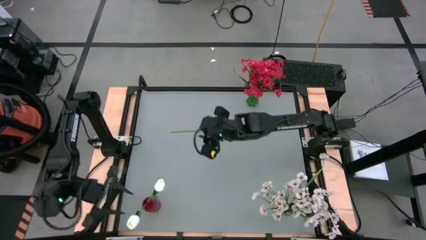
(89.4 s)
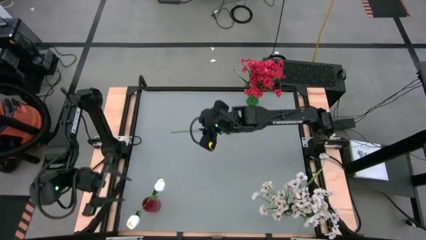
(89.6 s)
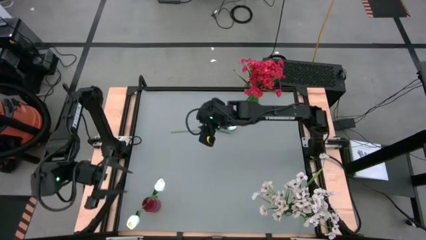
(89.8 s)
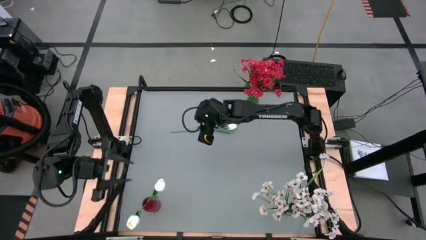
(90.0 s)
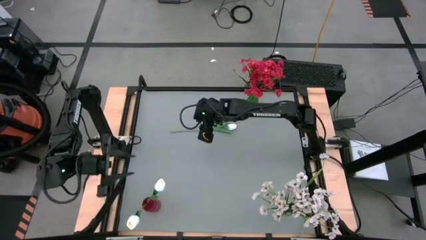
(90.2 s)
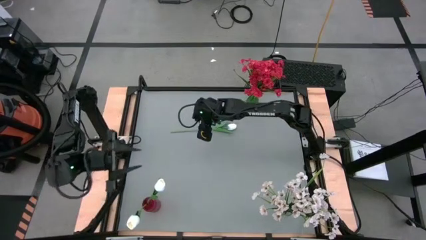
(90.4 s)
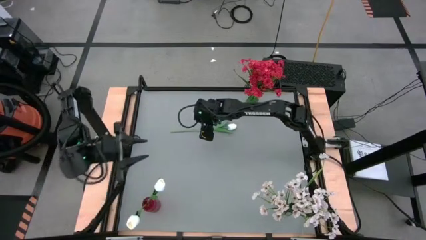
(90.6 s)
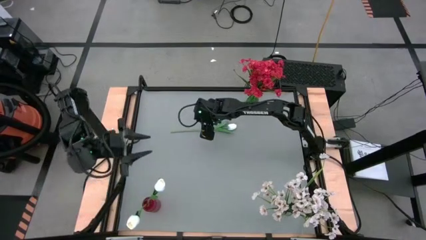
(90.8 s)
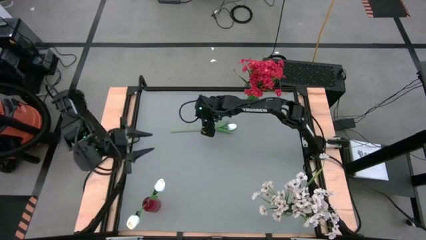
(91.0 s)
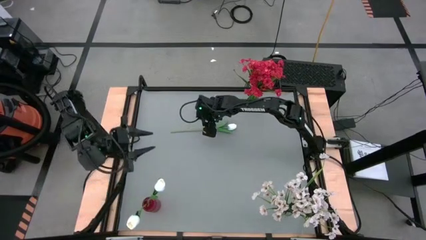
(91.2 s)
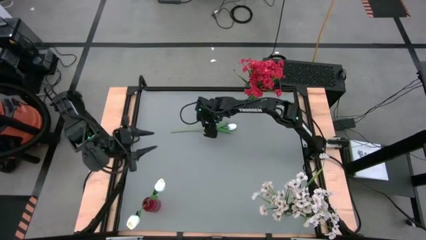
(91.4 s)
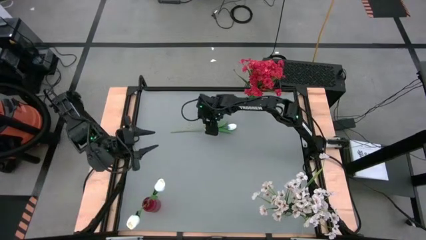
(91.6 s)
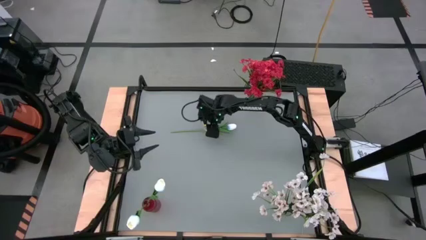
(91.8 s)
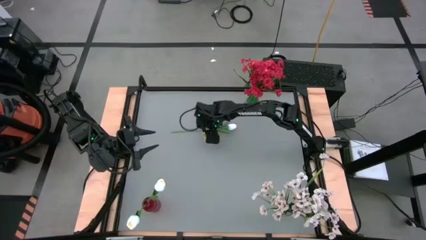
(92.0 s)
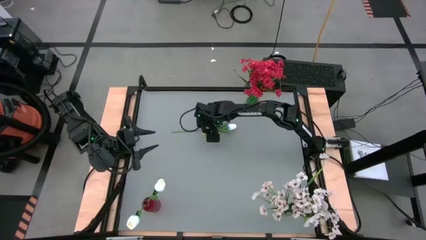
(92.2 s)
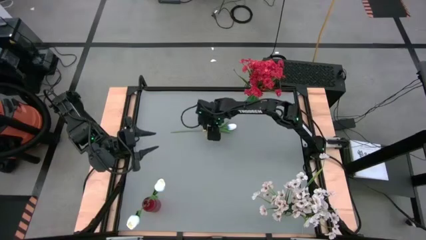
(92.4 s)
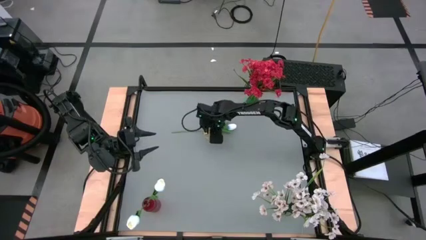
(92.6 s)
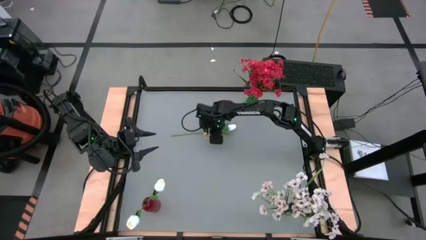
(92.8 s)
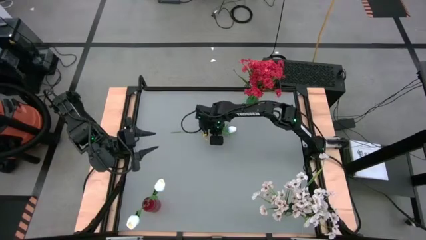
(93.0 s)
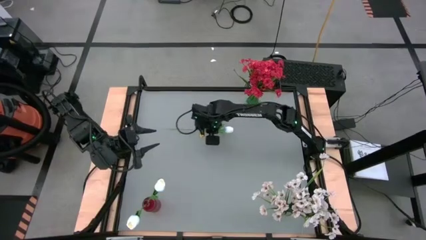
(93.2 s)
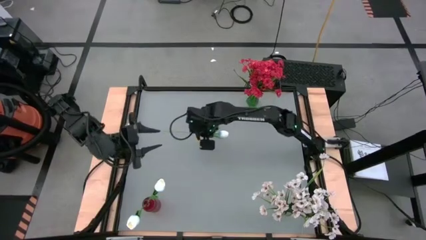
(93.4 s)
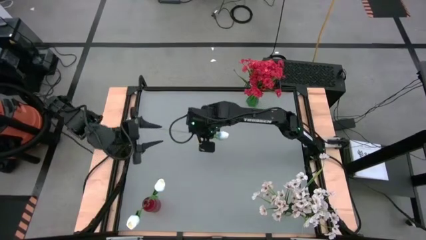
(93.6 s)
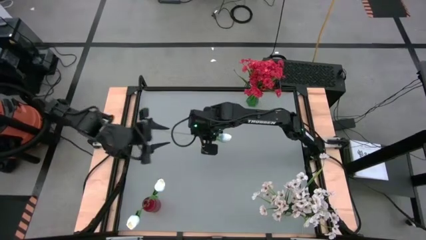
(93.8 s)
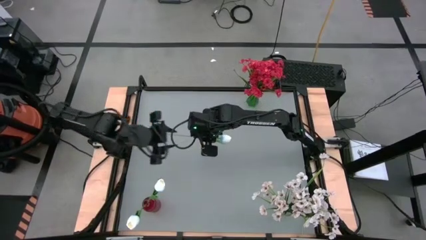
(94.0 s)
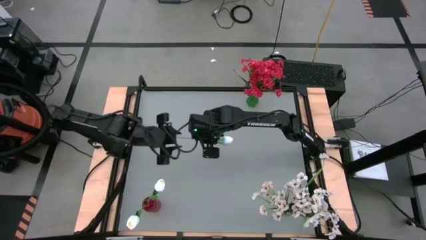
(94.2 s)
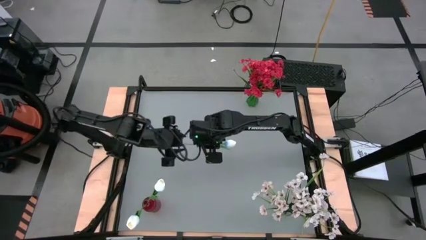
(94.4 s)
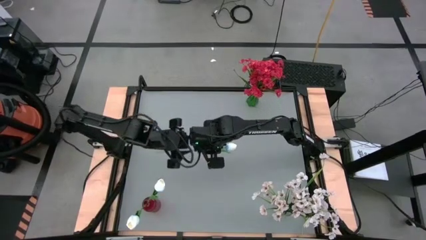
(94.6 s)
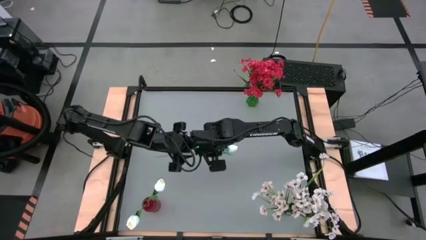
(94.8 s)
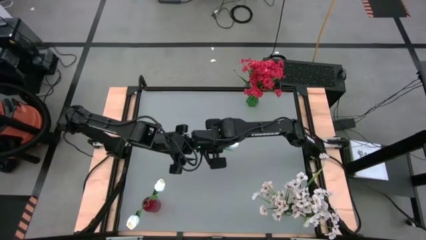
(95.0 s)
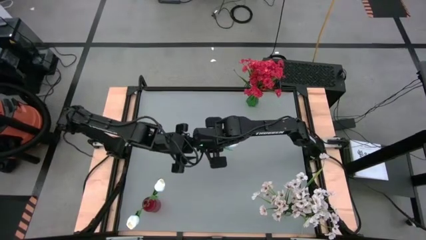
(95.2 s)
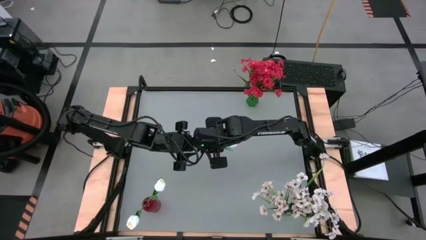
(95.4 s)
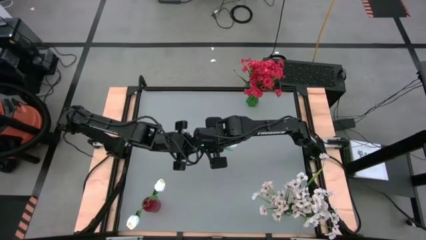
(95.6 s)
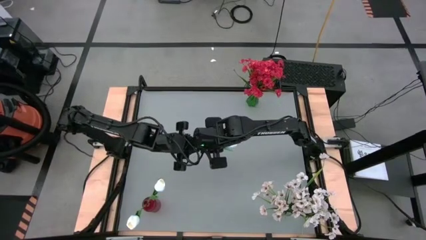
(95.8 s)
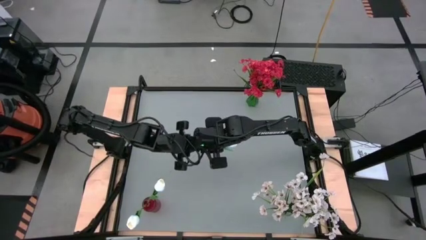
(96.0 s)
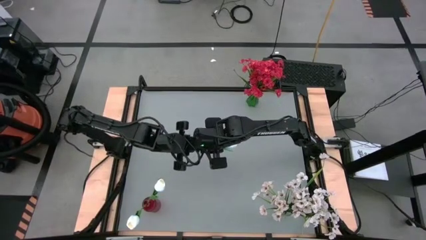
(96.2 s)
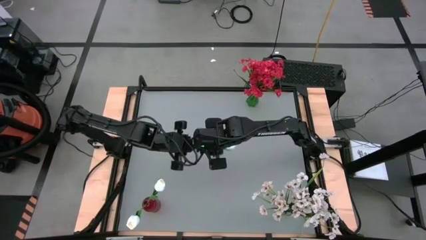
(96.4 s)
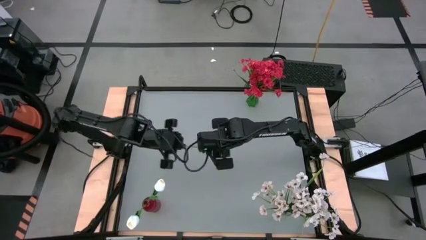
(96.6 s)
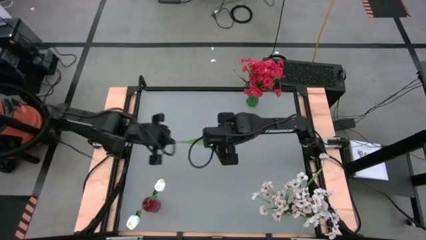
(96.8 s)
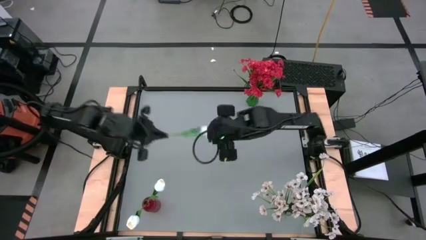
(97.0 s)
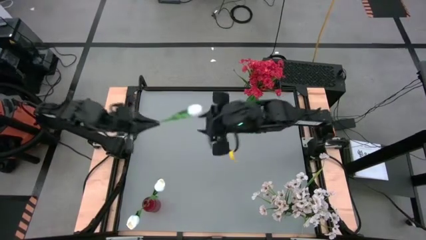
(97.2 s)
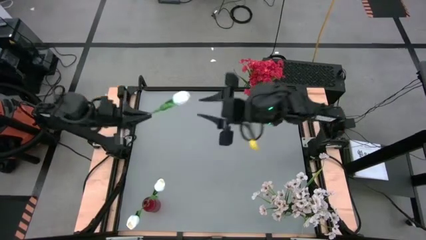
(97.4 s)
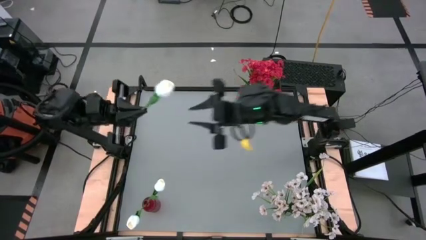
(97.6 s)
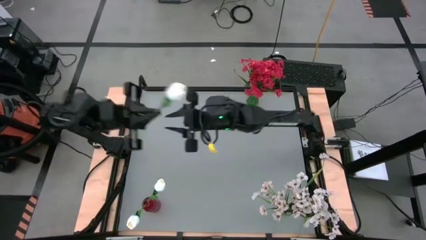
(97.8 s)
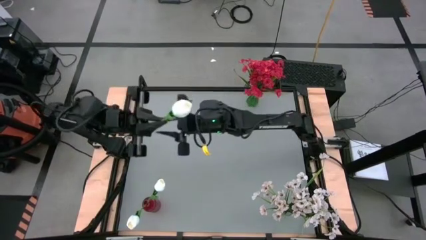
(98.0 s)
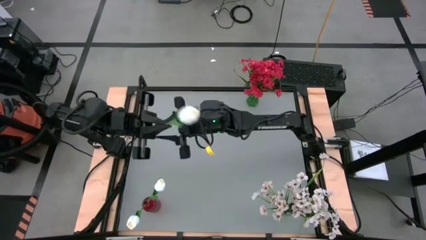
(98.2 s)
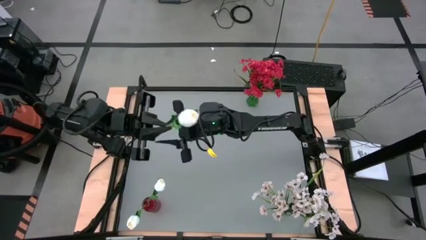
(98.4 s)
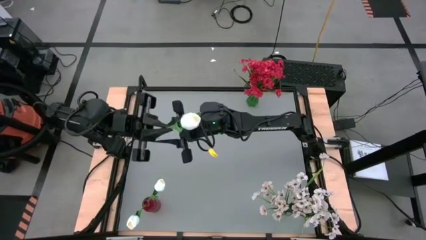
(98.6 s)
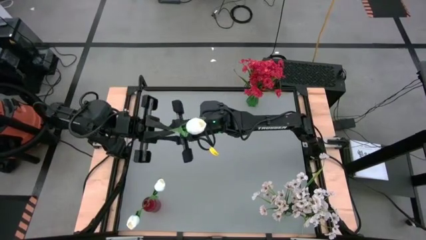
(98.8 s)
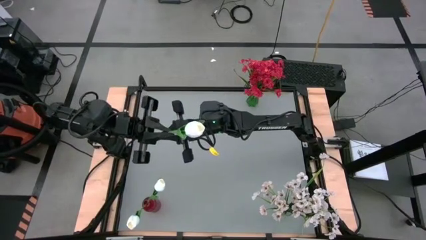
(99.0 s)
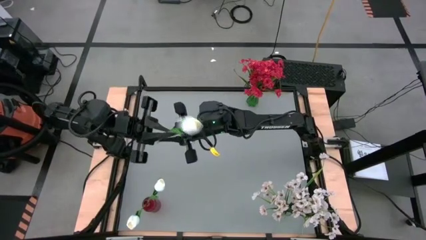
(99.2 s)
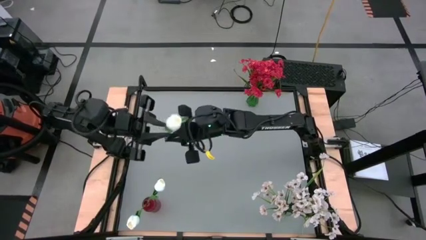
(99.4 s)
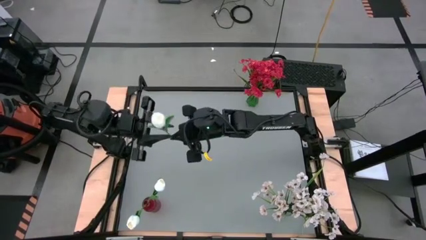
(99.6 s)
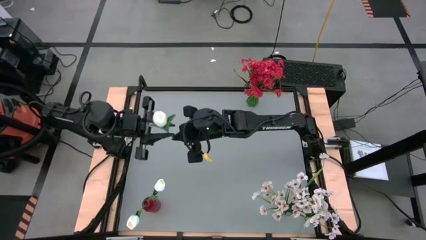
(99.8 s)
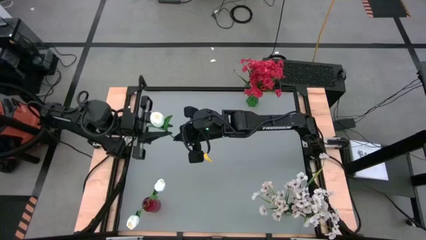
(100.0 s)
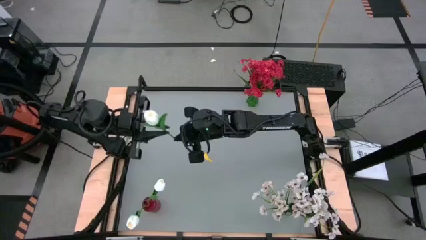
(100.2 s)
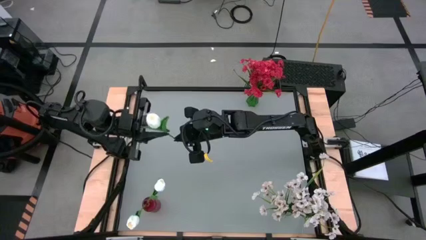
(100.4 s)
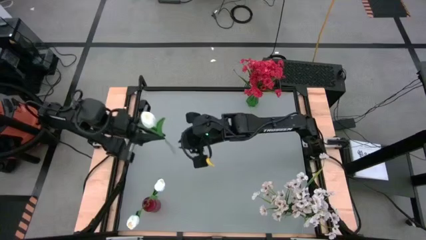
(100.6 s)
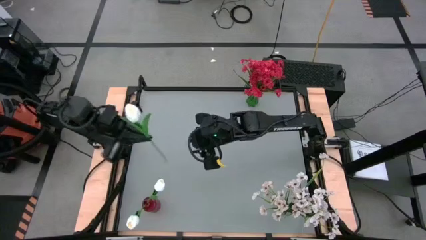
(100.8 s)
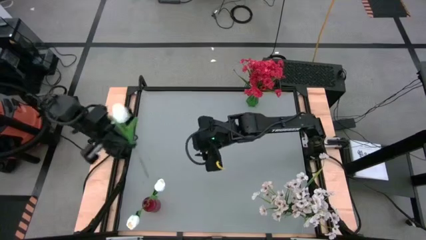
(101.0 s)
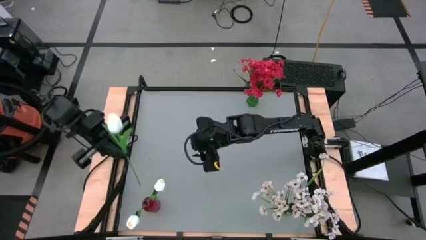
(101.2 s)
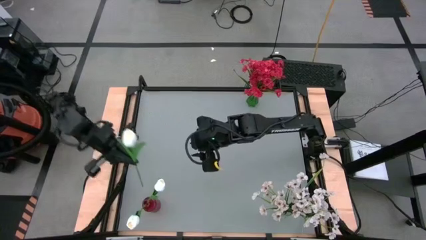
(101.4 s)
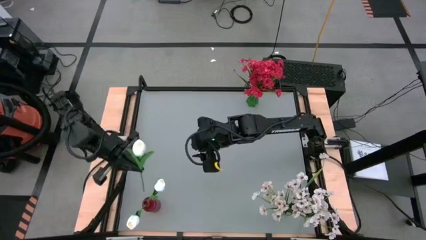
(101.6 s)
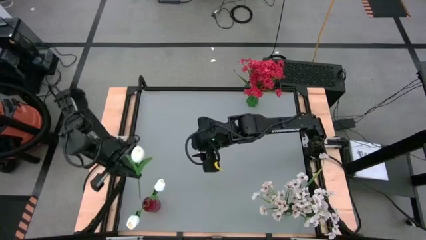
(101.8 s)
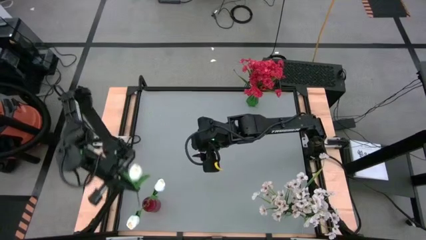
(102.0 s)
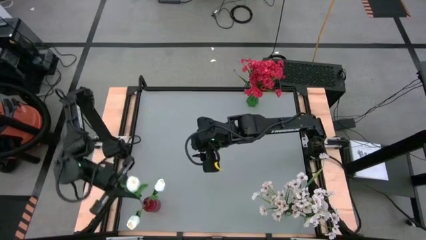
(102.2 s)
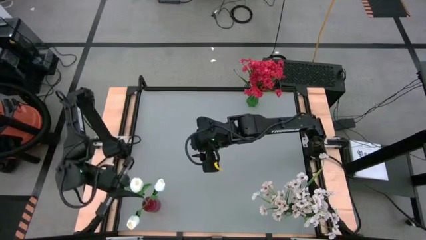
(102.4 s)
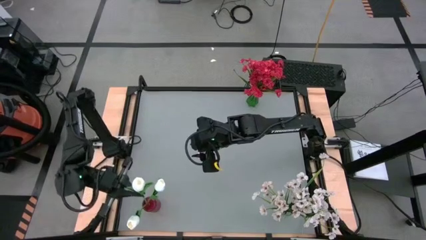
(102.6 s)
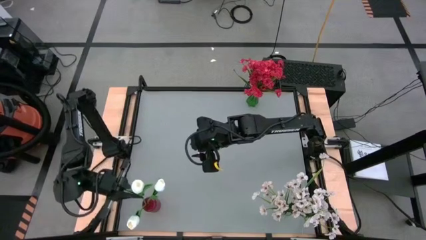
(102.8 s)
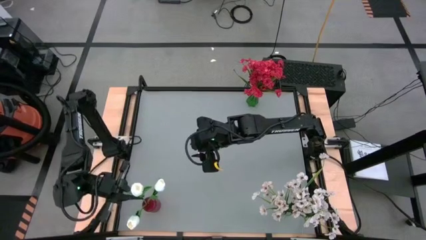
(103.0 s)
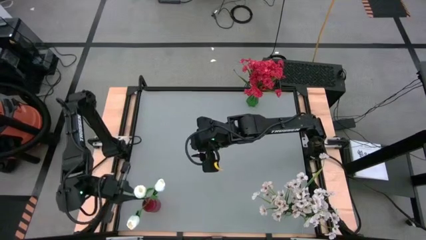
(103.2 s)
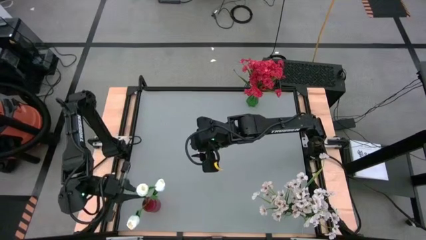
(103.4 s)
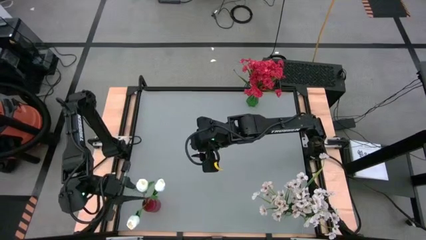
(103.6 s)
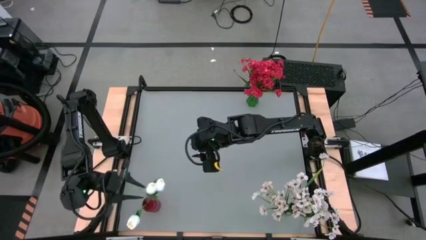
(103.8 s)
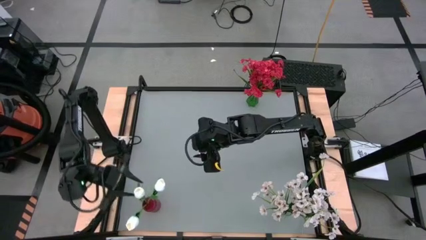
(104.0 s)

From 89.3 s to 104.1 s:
Task: Sort flowers into vase by color
Put the white tulip flower into the red vase

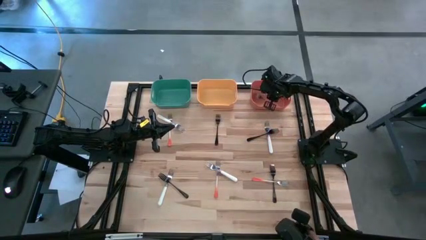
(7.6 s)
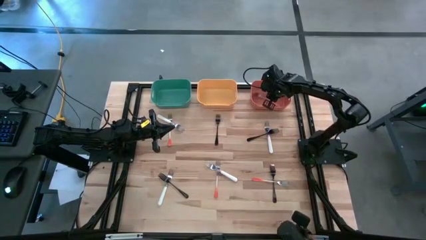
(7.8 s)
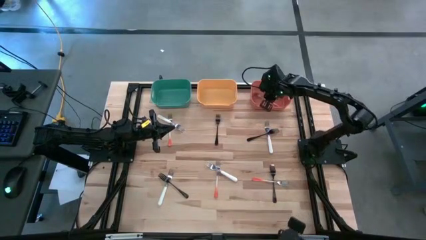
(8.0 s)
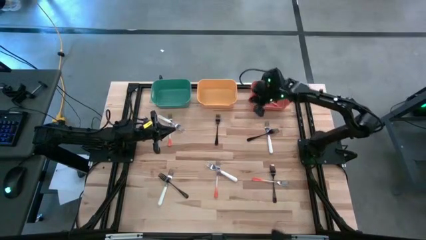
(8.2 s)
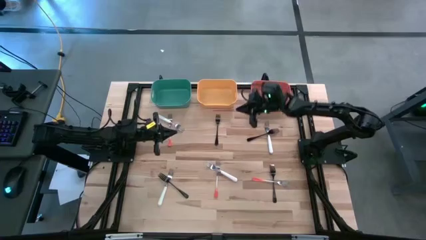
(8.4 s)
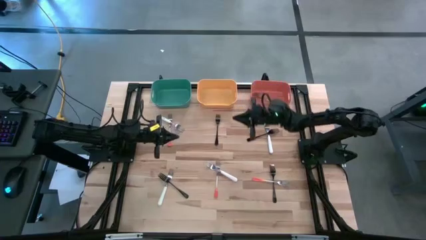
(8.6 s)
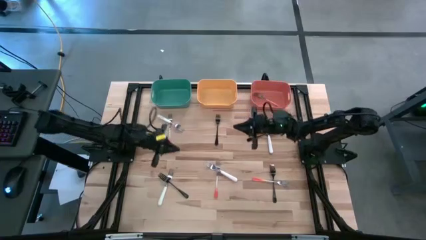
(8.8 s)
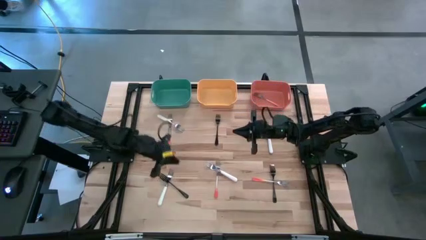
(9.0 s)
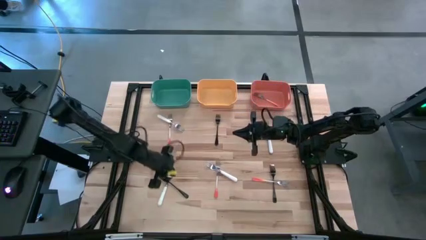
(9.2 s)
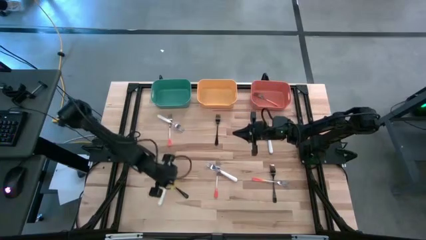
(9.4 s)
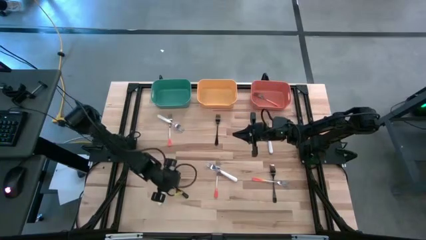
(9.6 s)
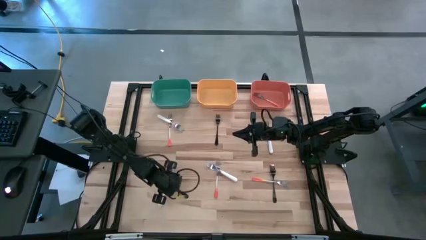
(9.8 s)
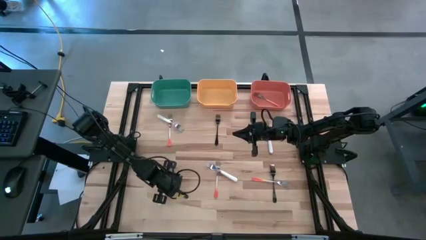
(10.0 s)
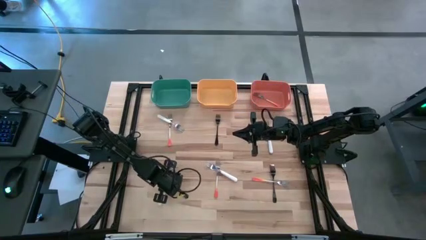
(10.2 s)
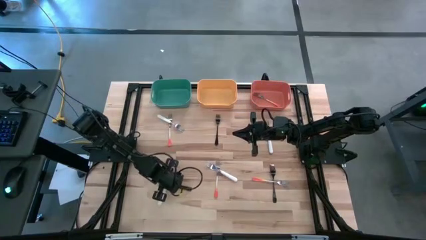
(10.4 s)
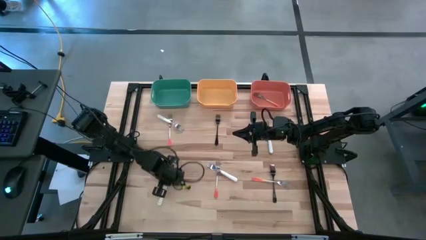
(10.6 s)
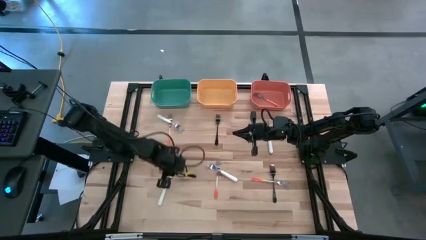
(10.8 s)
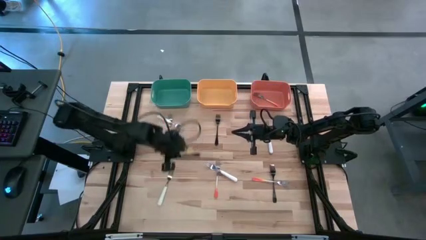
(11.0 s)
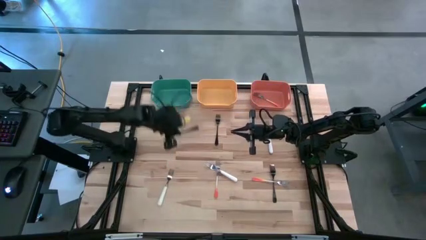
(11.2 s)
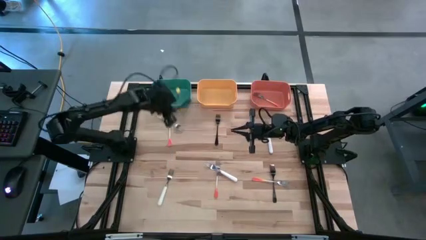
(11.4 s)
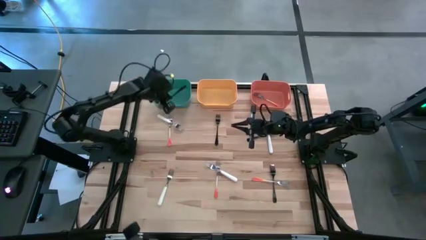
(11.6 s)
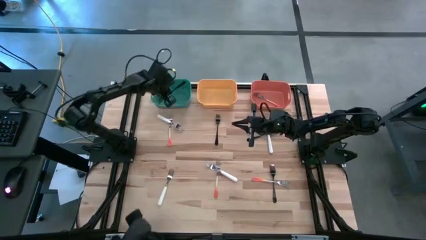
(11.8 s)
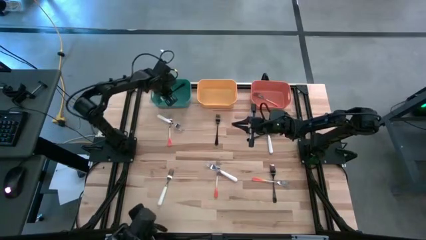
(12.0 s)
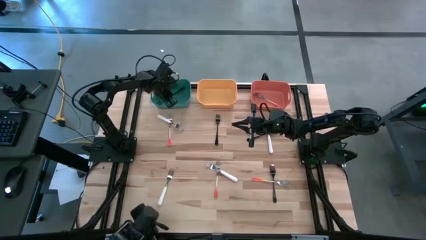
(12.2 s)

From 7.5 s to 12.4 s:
Task: Sort silverware by color (type)
Put the black fork into the green bin
